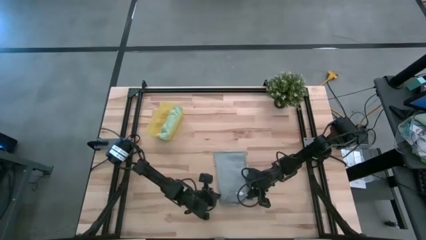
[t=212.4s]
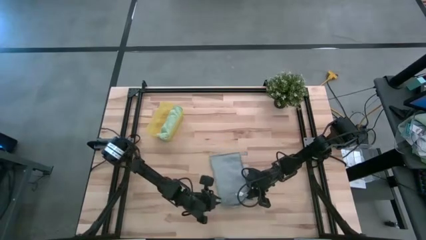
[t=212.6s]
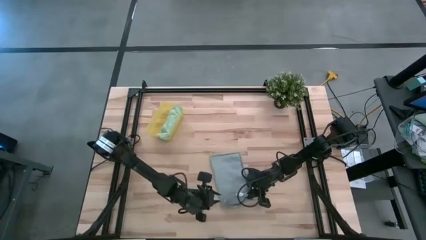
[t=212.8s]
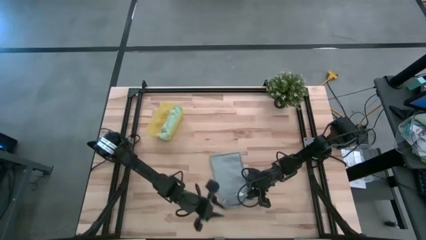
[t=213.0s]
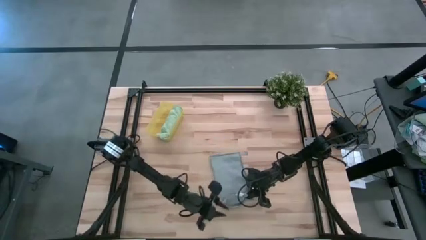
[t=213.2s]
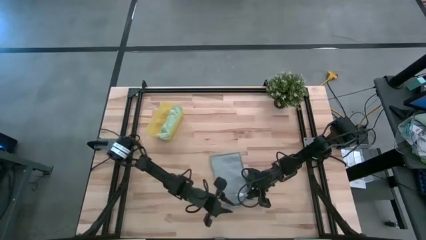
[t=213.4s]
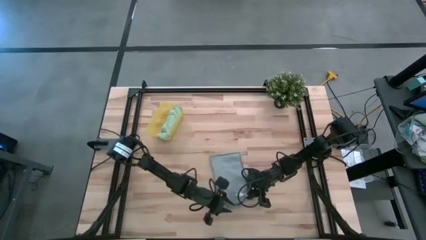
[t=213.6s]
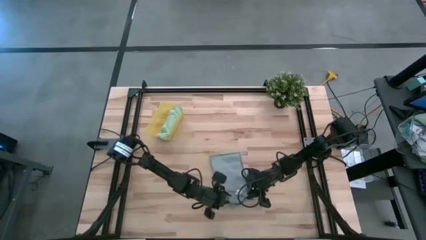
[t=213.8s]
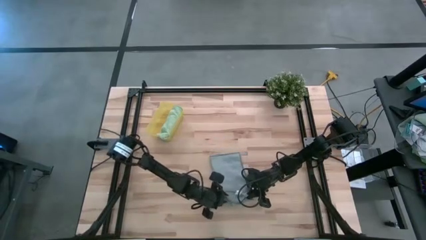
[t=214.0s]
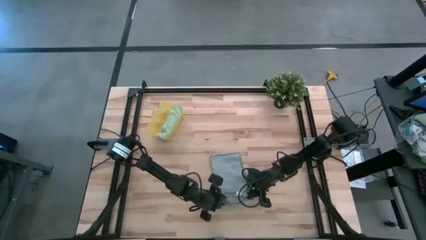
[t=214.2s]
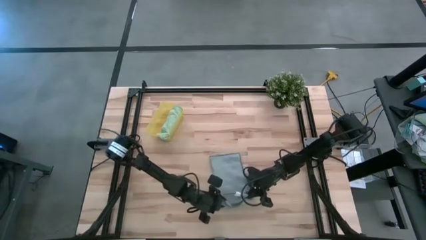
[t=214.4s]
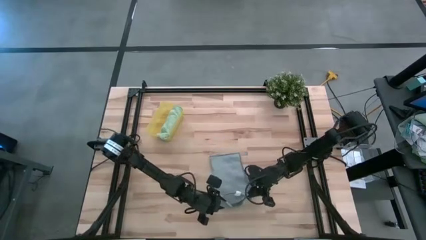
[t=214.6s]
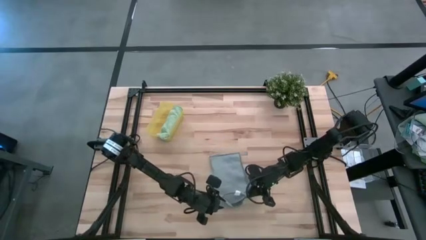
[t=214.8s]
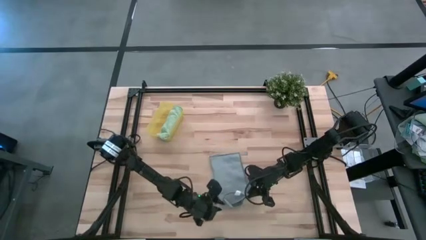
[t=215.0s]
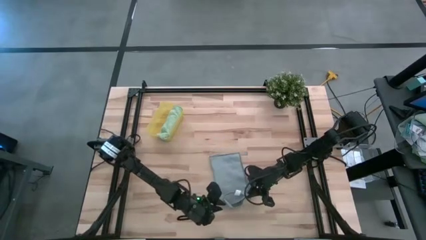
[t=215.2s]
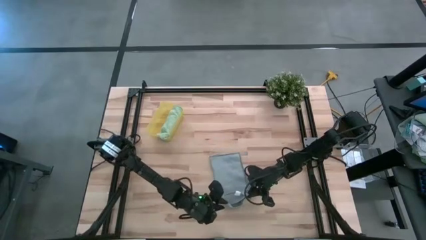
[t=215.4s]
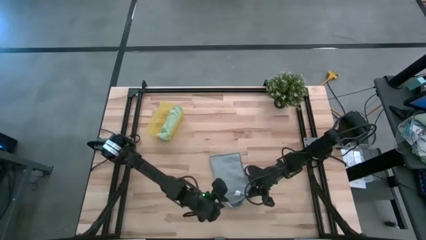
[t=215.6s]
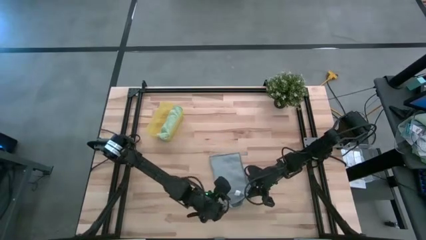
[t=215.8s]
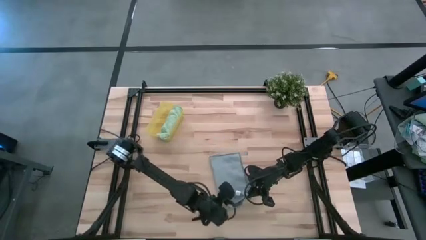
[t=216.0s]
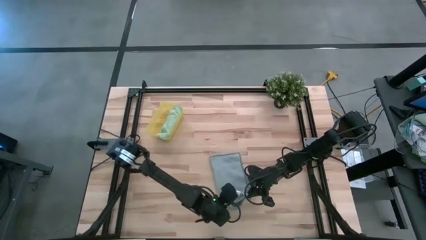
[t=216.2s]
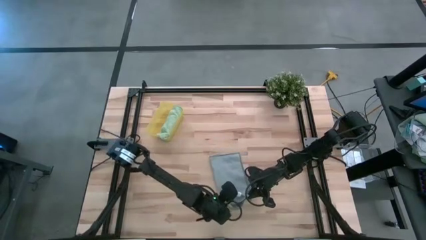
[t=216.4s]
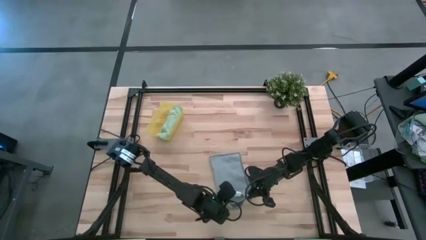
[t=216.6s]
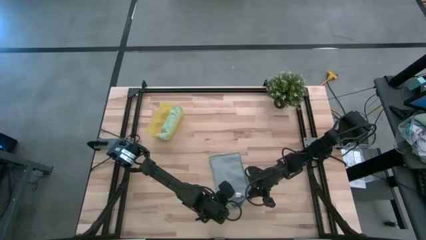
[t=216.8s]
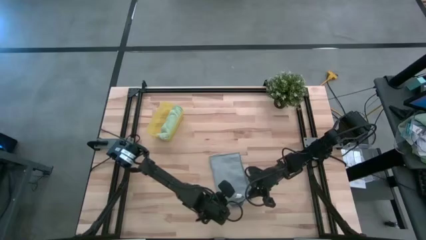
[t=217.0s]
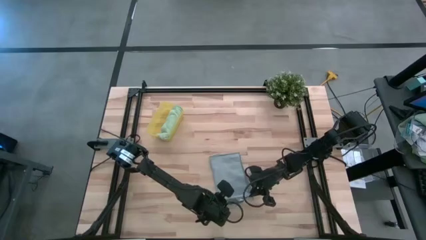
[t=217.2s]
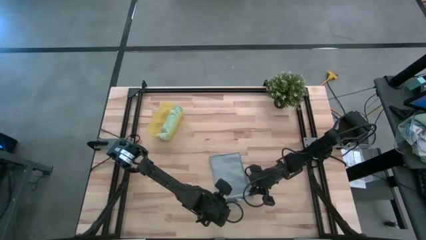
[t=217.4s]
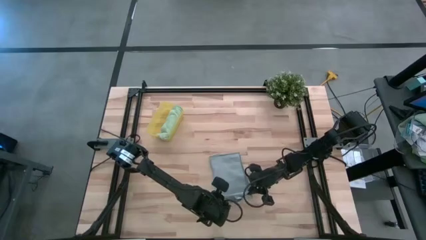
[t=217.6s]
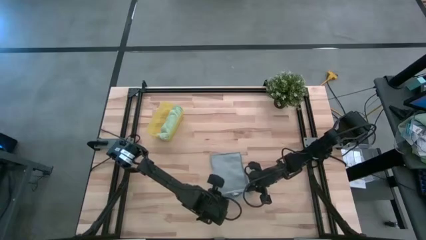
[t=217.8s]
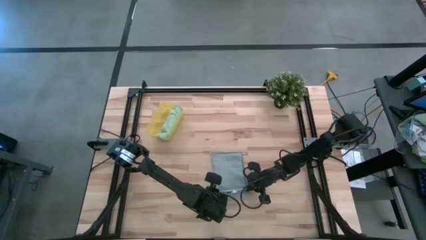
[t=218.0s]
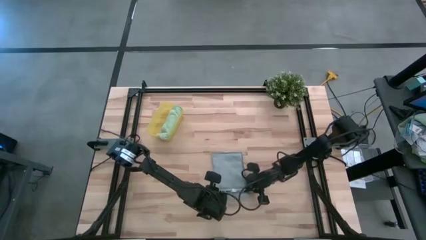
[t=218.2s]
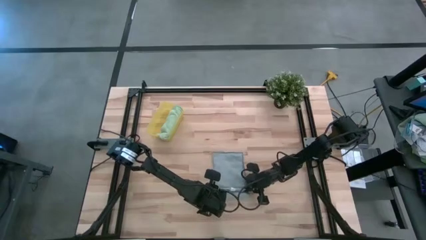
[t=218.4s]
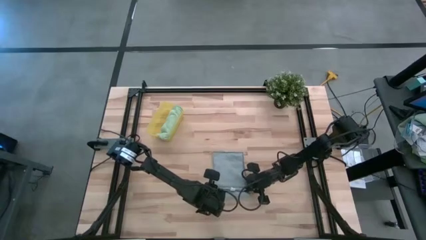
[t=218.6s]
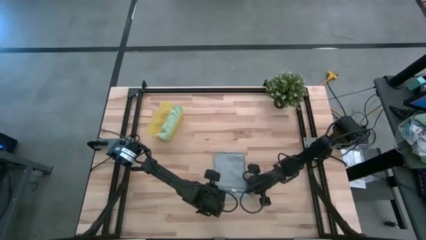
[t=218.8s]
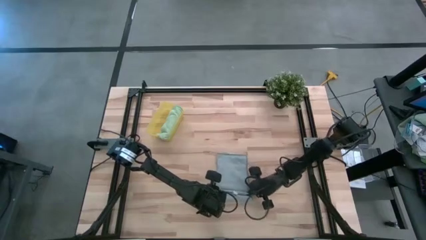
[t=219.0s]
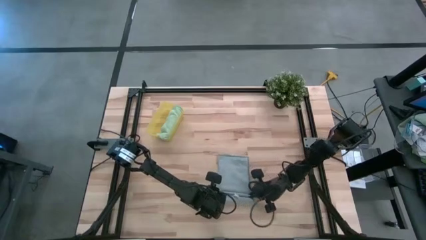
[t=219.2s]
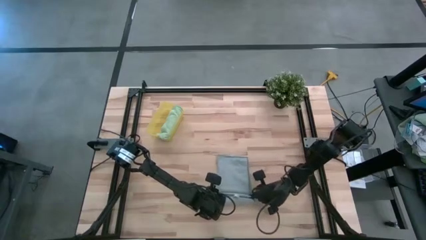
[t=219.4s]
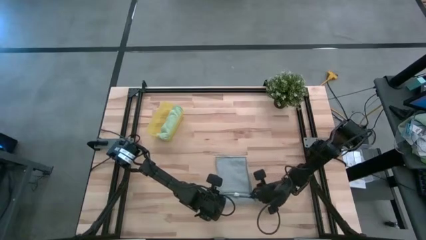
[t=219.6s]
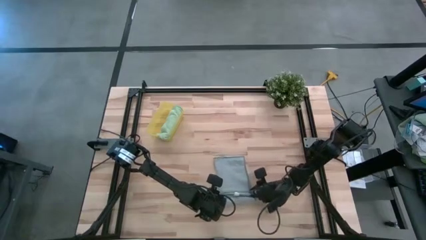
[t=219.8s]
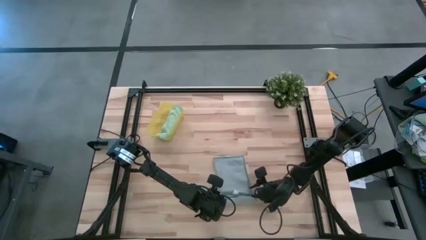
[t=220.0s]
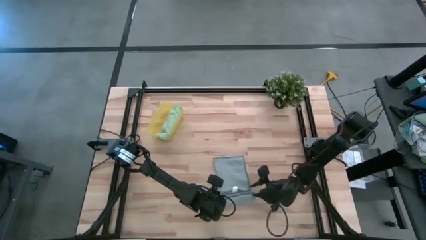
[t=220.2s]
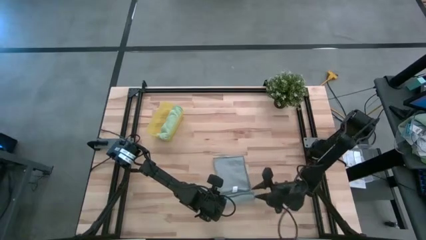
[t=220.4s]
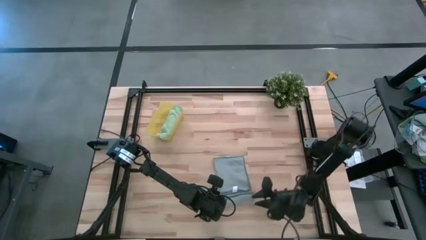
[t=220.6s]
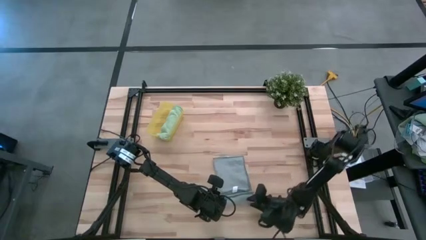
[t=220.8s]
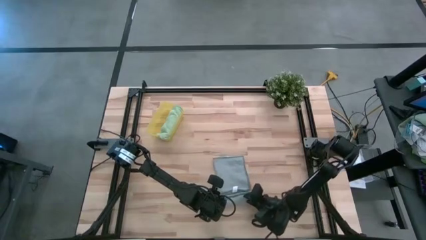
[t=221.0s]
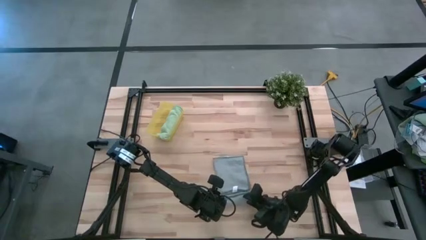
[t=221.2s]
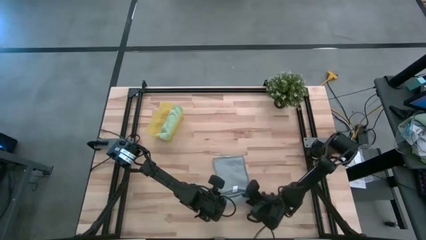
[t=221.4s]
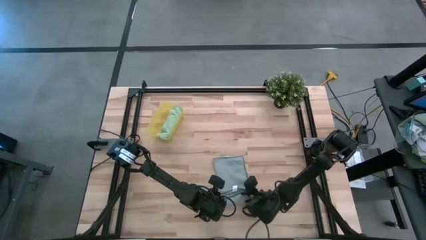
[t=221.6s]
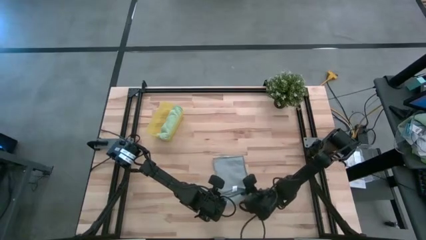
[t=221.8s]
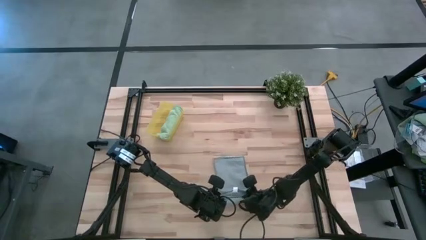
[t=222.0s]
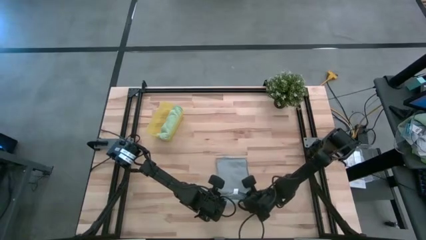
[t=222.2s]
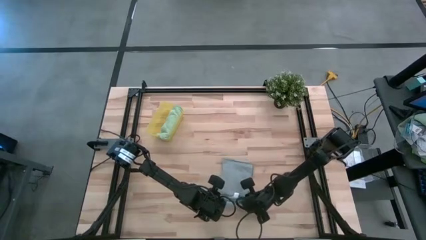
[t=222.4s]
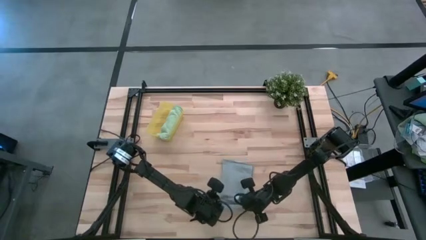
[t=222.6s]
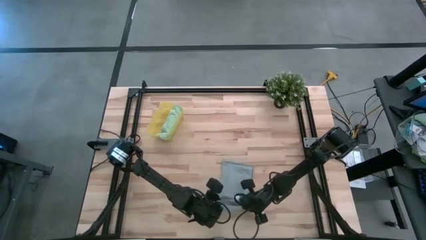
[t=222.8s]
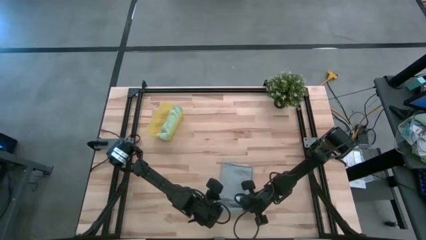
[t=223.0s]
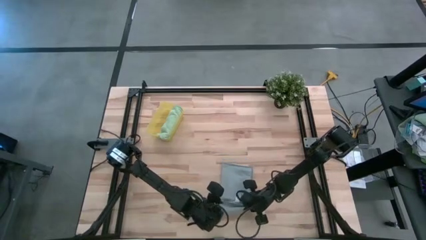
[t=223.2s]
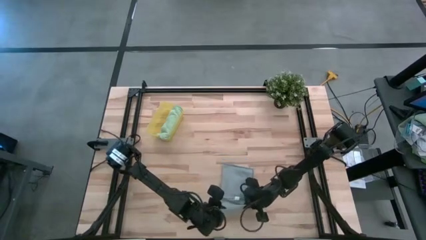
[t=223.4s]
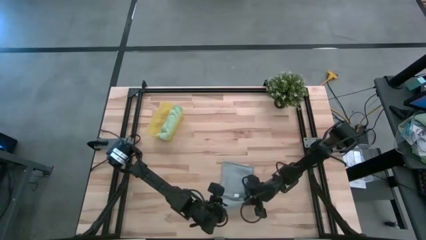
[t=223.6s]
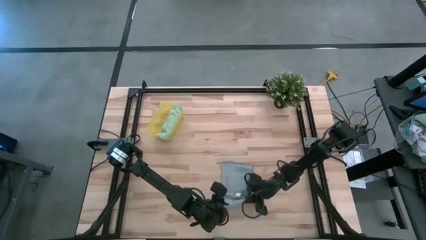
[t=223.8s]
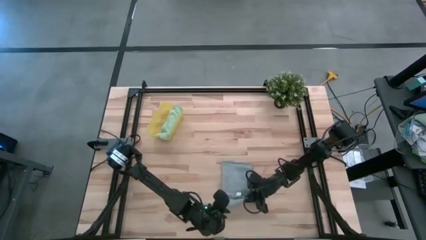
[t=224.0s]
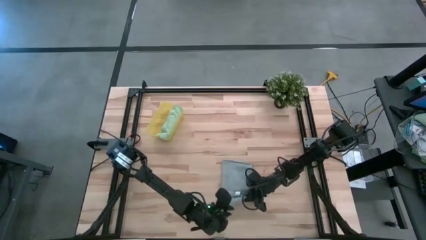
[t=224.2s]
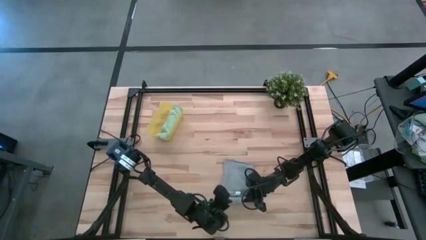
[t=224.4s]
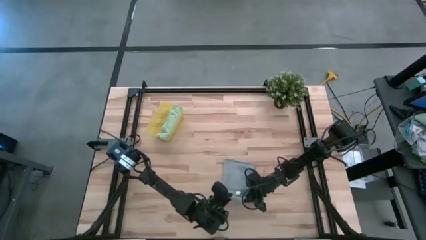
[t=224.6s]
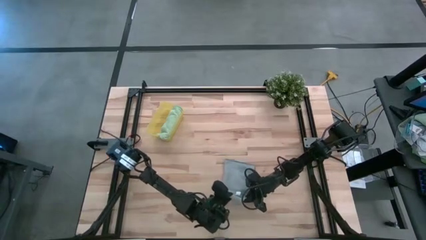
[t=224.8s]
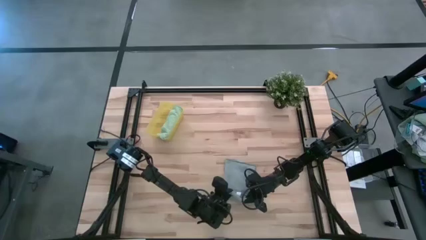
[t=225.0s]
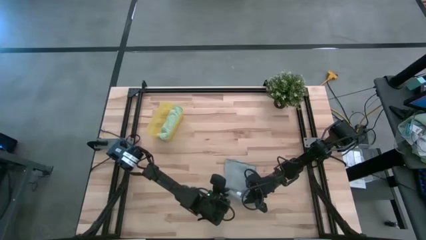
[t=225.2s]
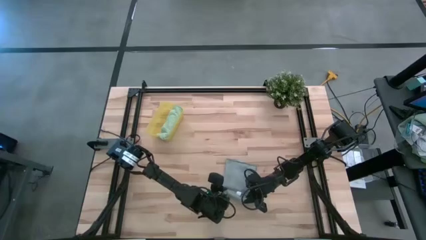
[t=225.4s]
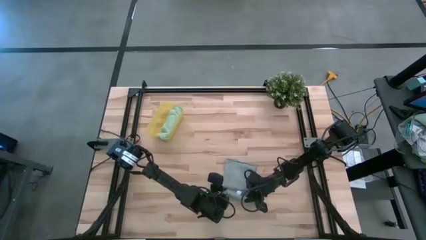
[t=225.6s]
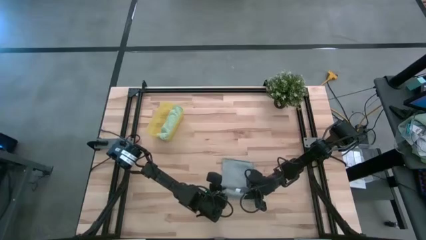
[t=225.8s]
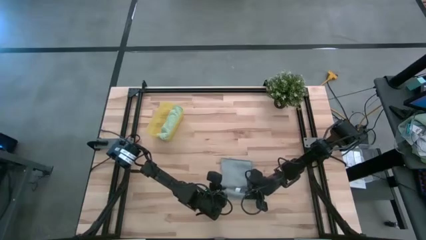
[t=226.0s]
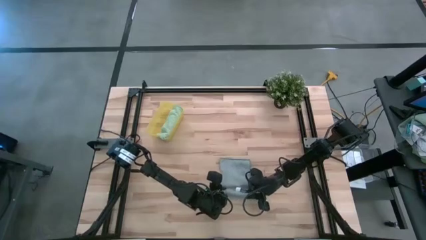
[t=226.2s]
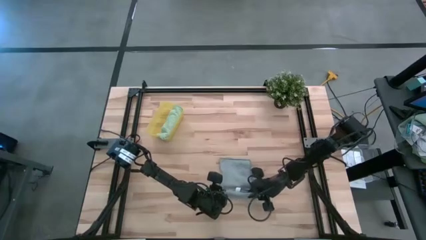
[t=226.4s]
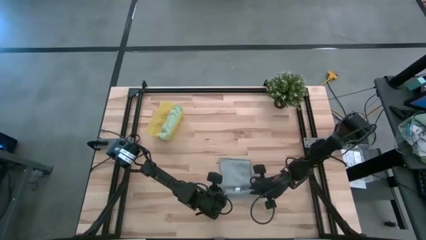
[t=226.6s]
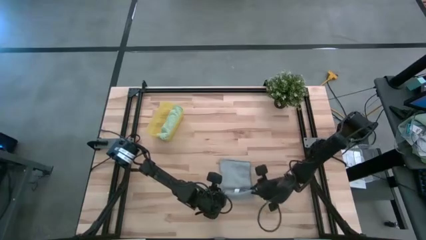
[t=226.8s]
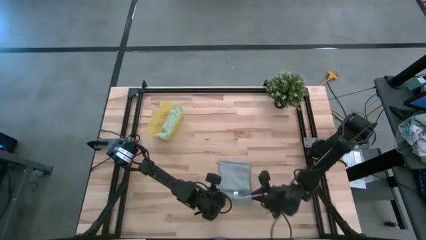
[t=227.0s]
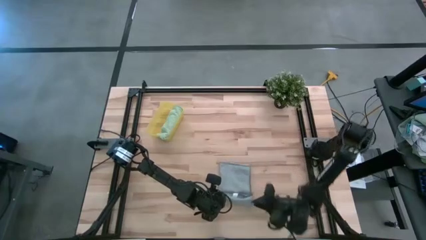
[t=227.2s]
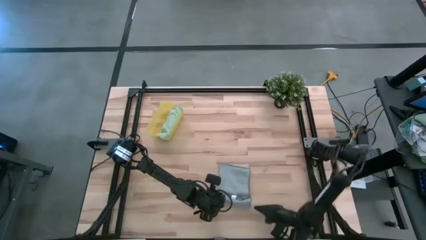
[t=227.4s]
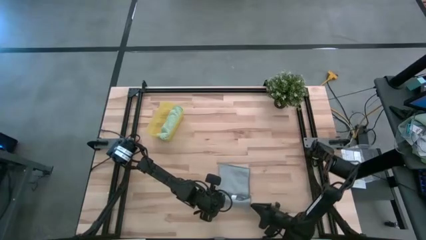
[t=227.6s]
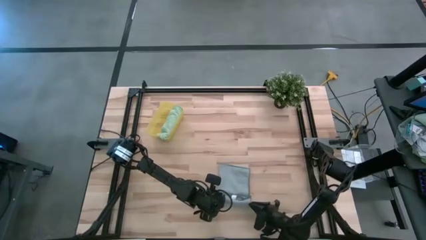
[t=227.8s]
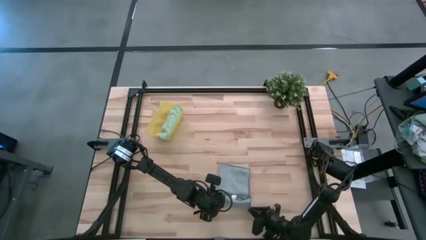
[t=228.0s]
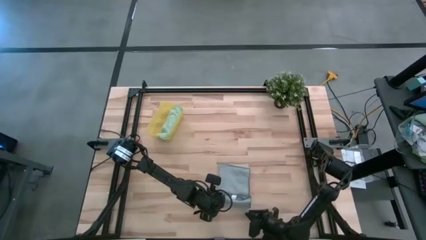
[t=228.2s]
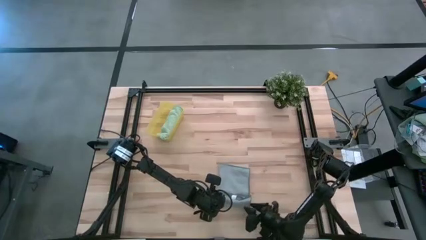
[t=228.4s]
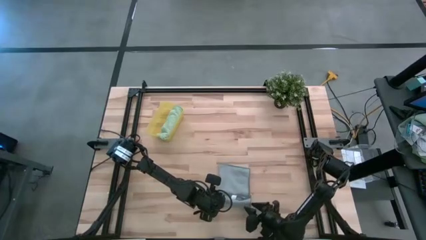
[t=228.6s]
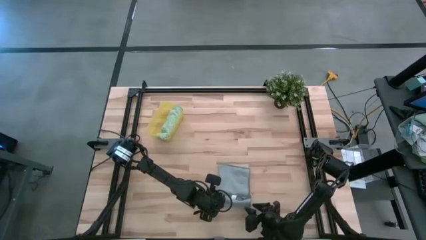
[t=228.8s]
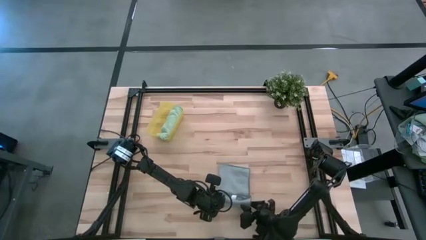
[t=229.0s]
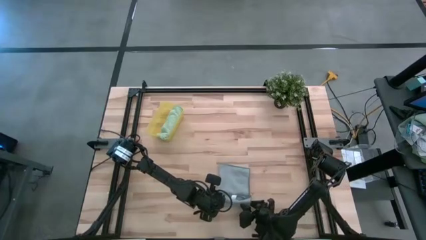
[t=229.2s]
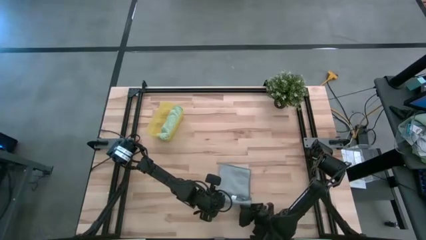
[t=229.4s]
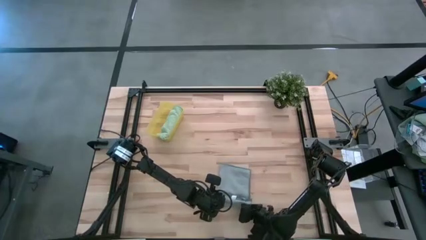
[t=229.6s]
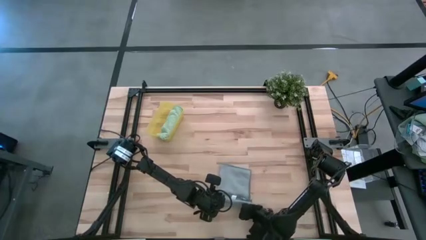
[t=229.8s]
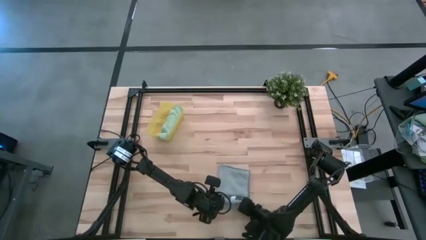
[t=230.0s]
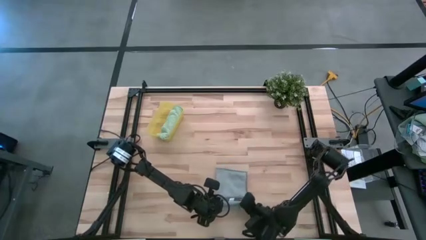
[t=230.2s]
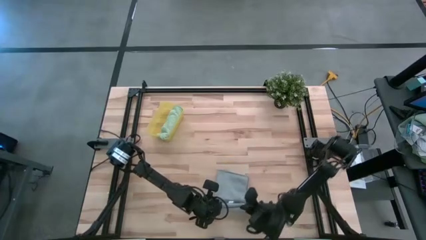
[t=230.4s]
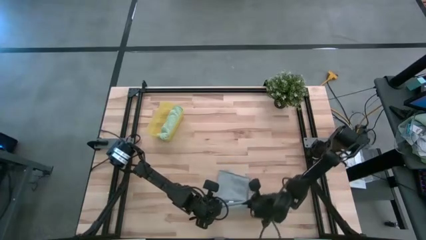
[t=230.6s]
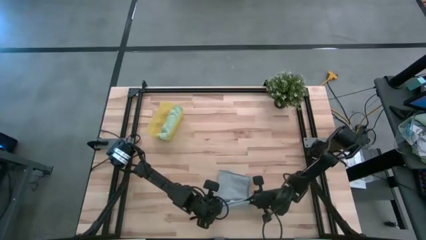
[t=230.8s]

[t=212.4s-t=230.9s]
Task: Roll microfiber towels into tight, uniform cylinder then place into a basket
Roll the gray towel
